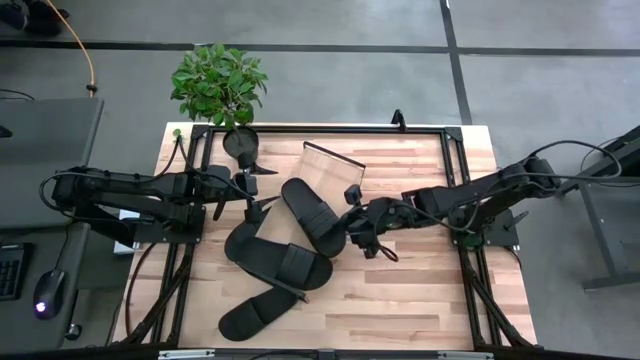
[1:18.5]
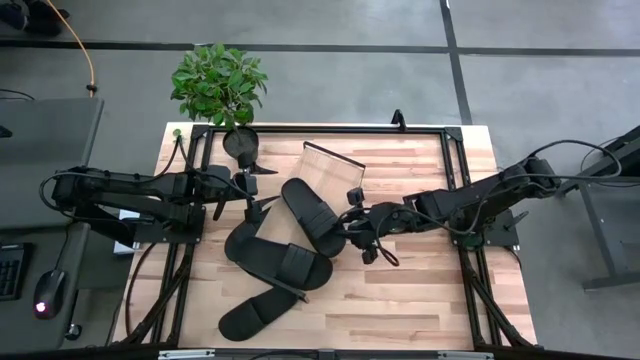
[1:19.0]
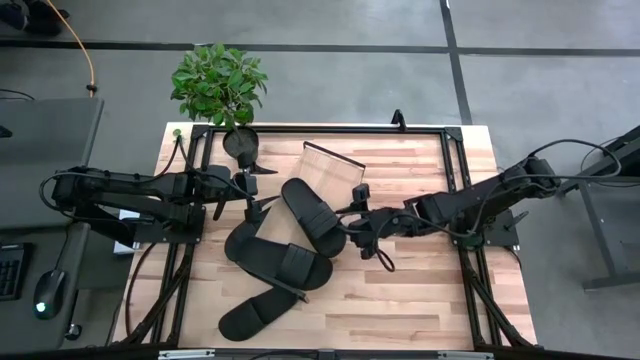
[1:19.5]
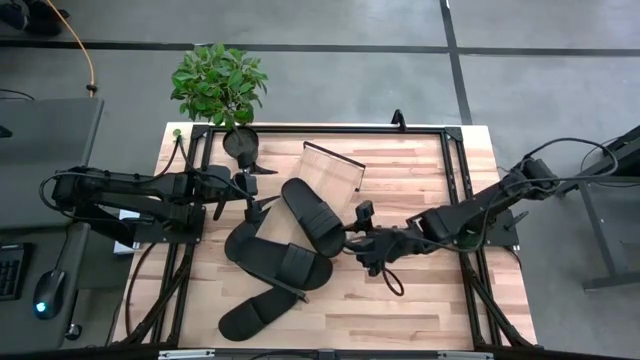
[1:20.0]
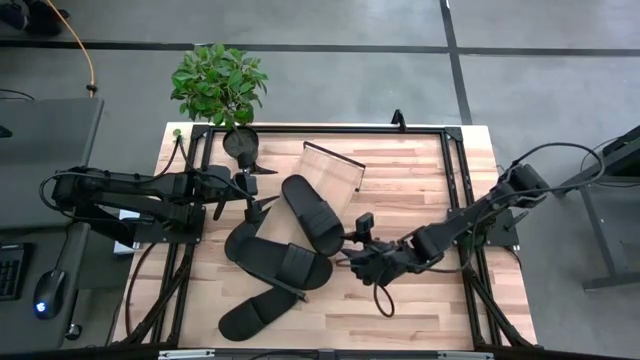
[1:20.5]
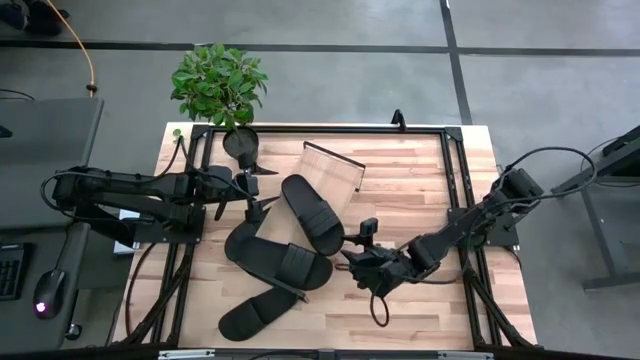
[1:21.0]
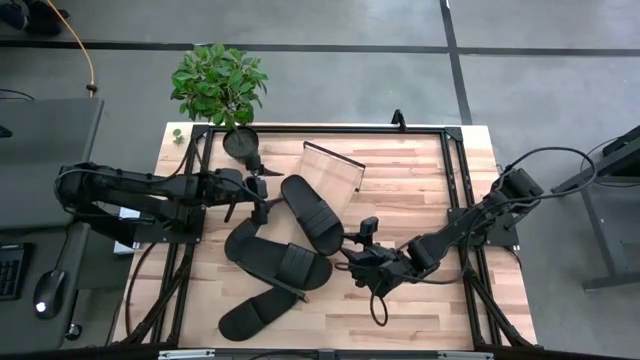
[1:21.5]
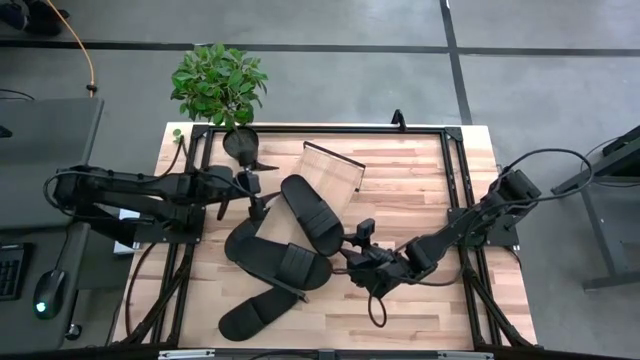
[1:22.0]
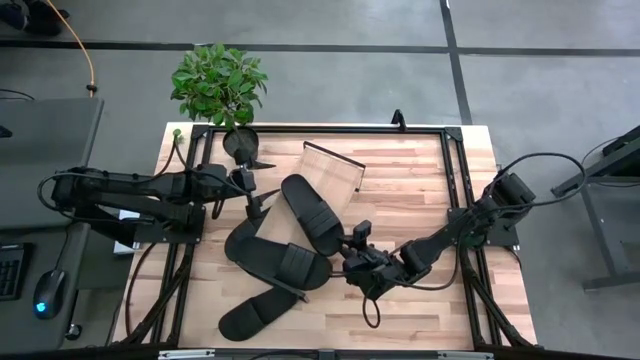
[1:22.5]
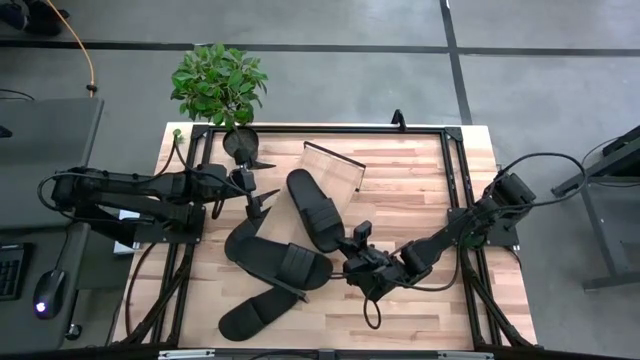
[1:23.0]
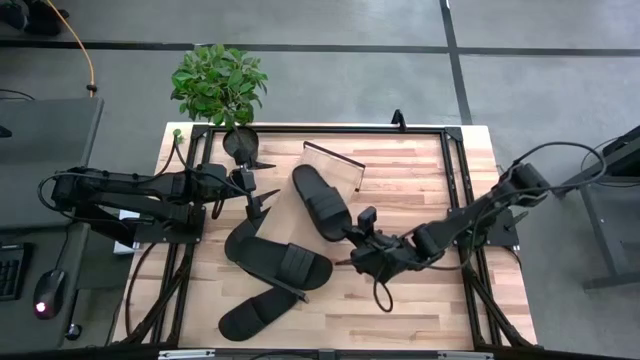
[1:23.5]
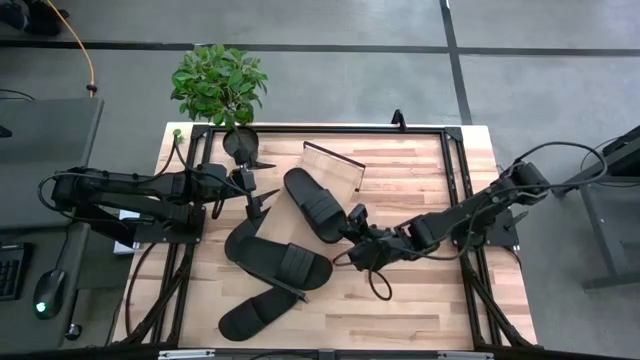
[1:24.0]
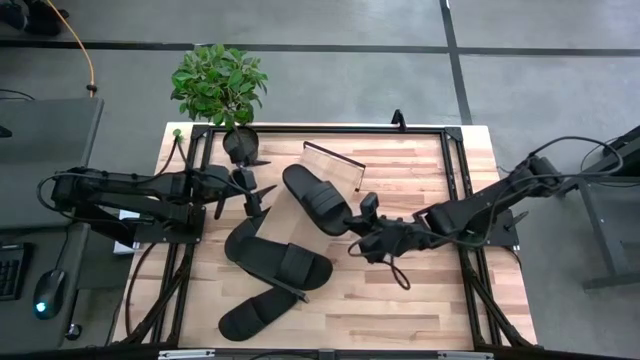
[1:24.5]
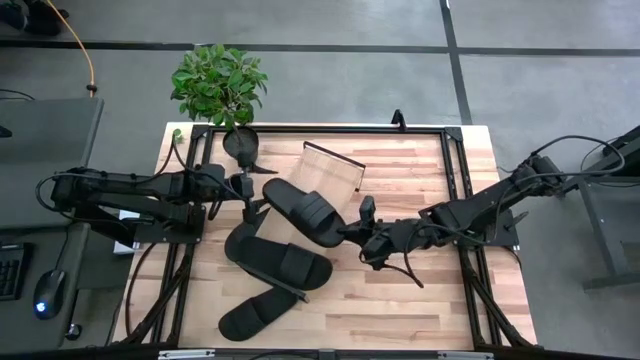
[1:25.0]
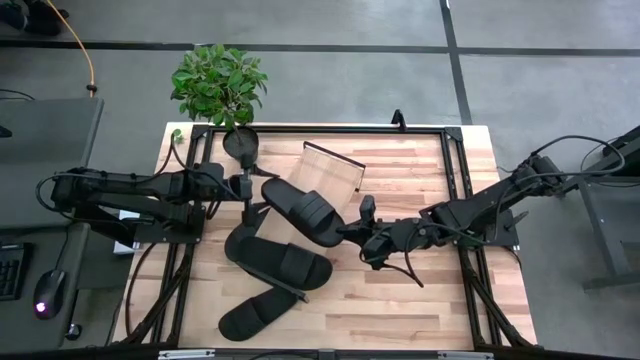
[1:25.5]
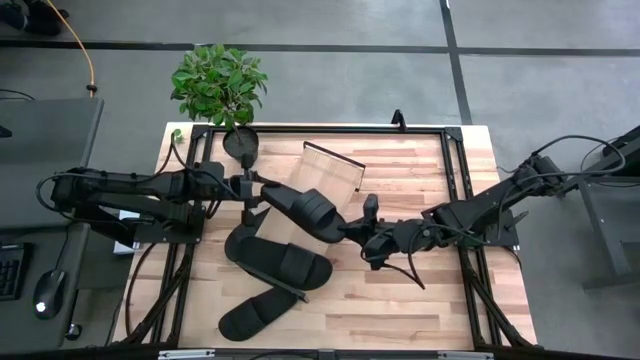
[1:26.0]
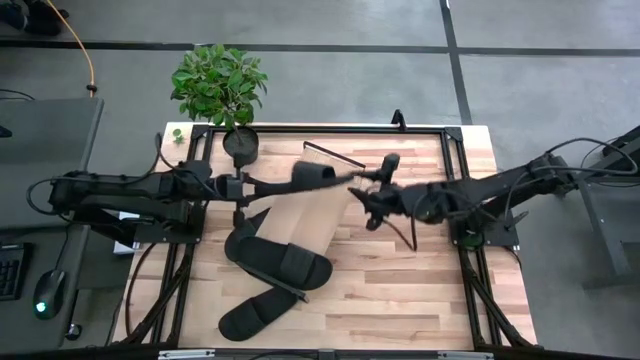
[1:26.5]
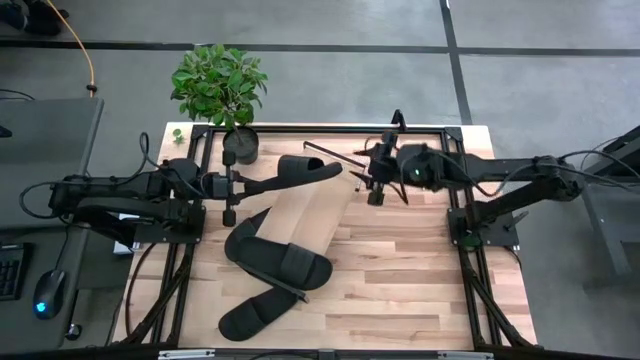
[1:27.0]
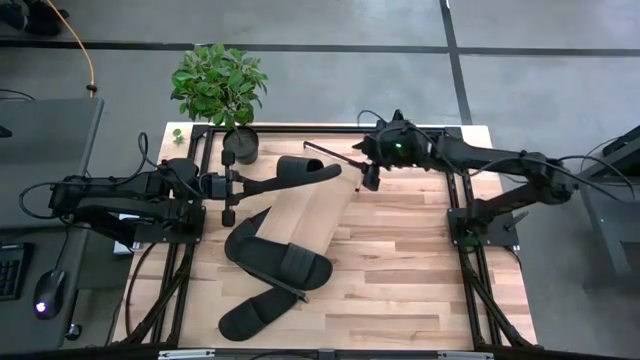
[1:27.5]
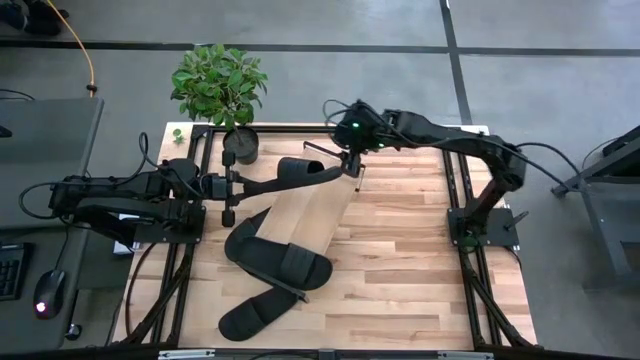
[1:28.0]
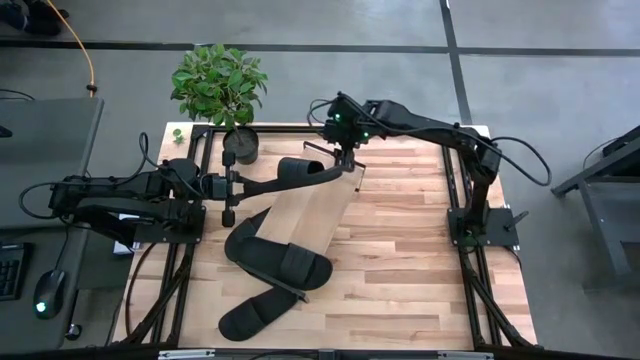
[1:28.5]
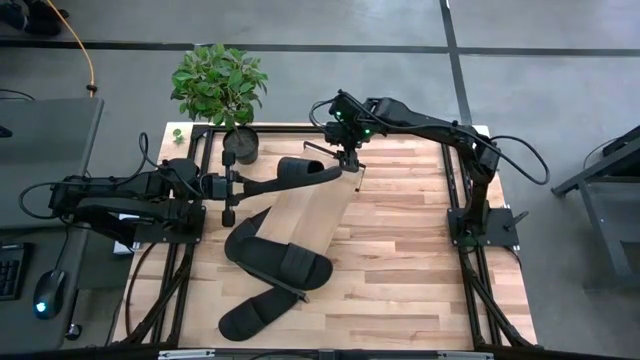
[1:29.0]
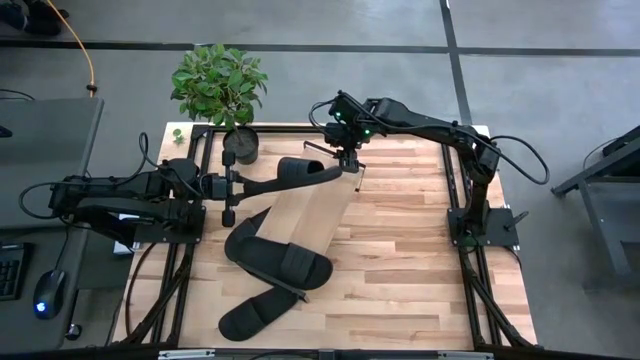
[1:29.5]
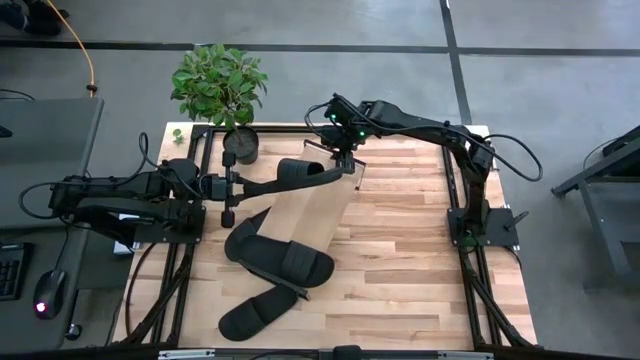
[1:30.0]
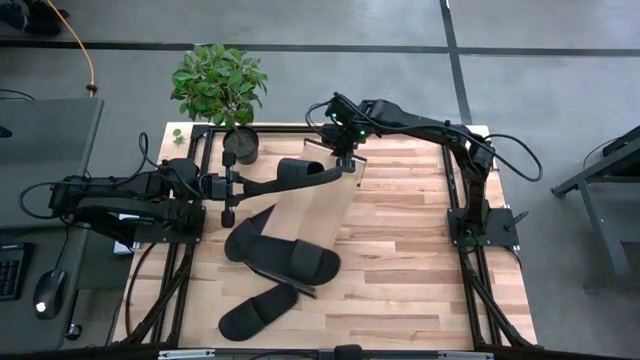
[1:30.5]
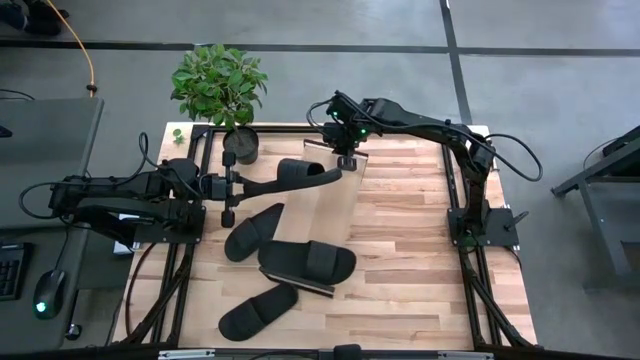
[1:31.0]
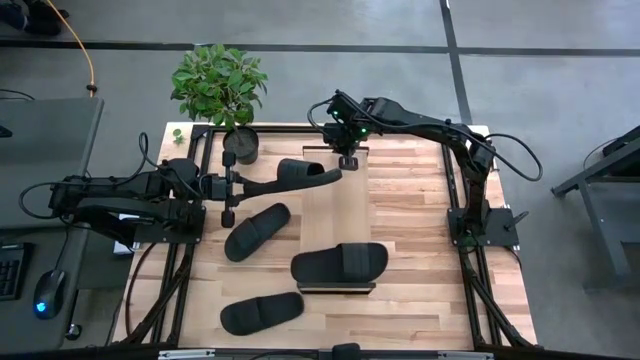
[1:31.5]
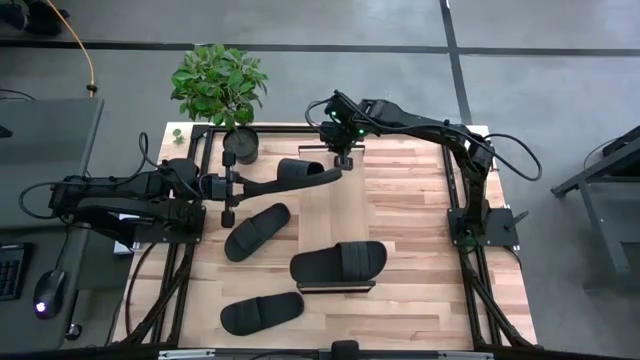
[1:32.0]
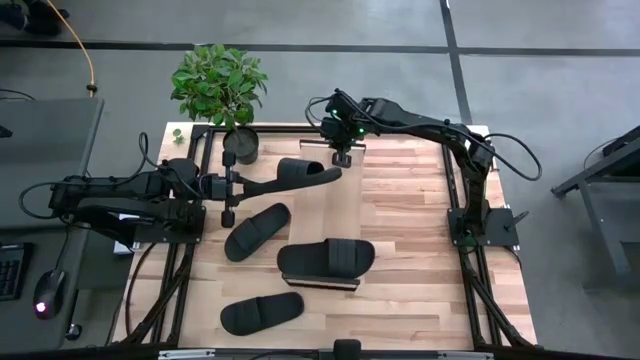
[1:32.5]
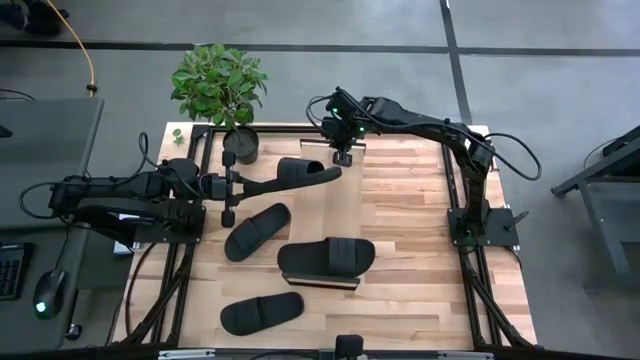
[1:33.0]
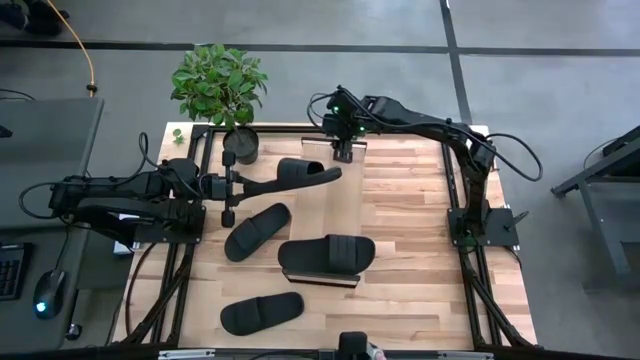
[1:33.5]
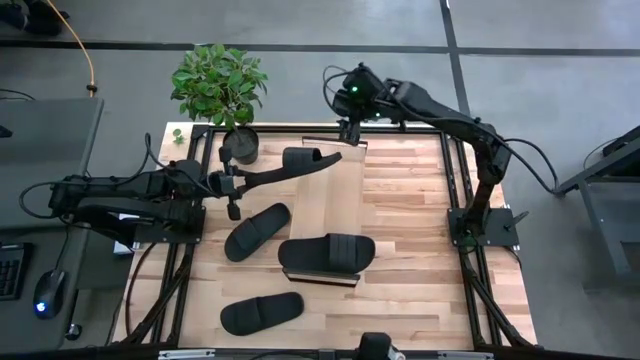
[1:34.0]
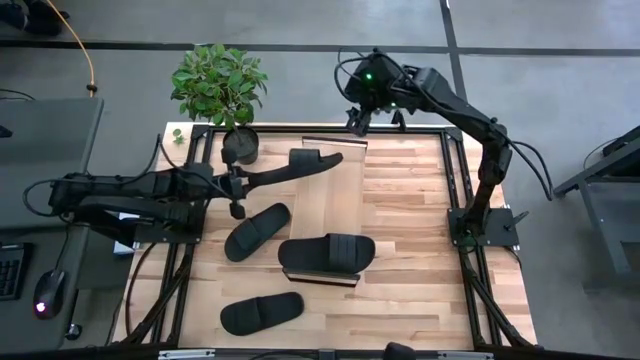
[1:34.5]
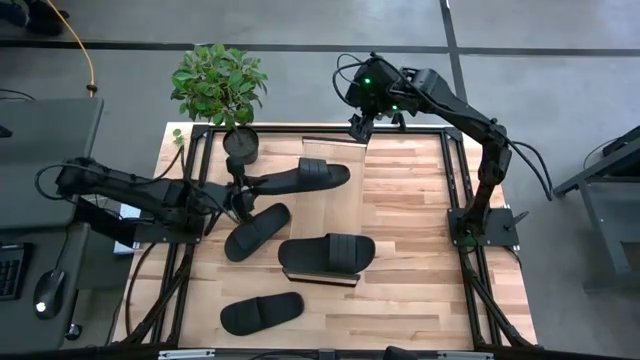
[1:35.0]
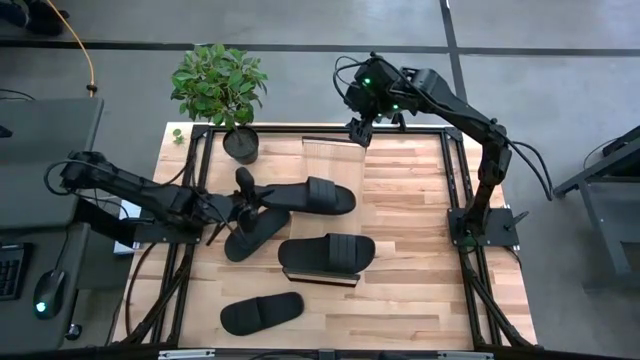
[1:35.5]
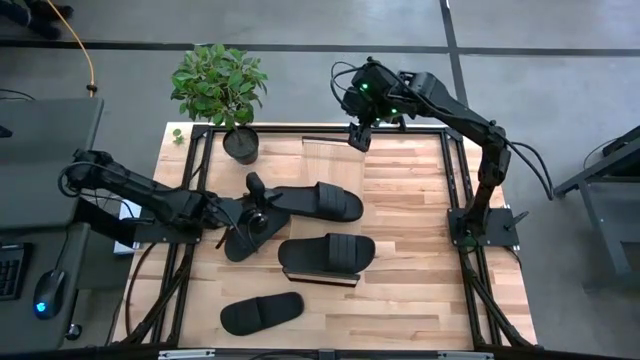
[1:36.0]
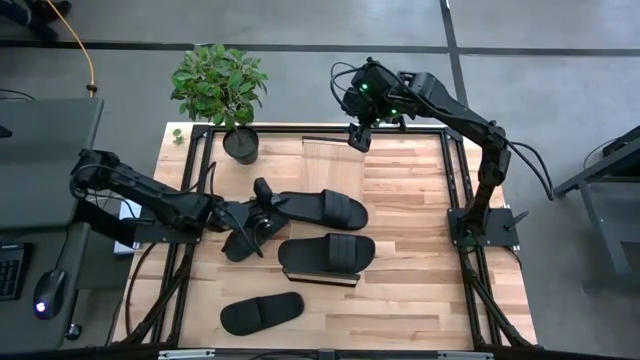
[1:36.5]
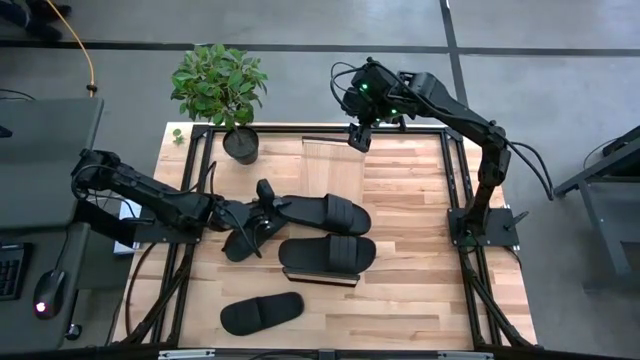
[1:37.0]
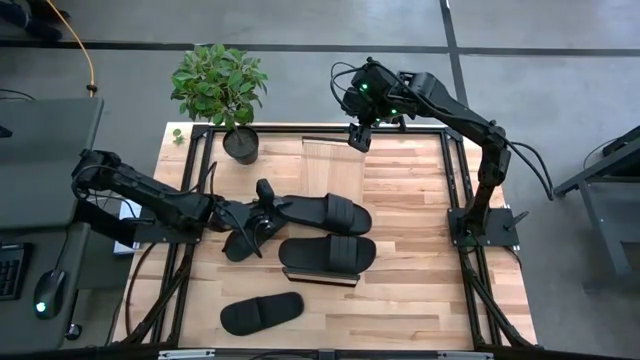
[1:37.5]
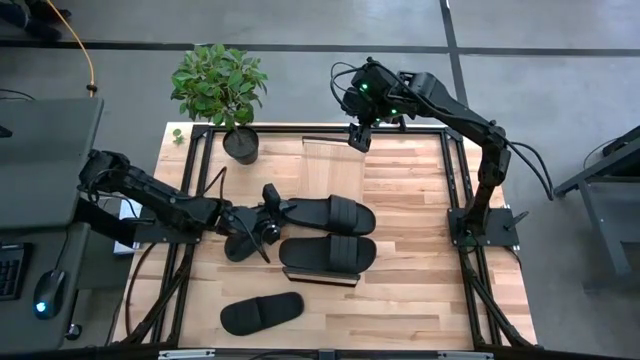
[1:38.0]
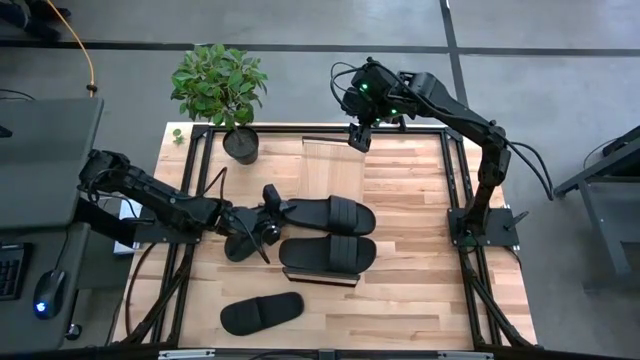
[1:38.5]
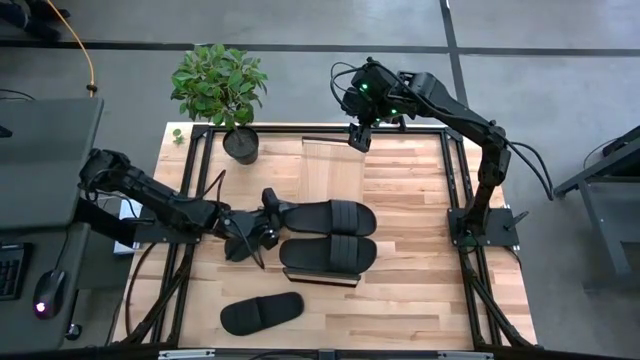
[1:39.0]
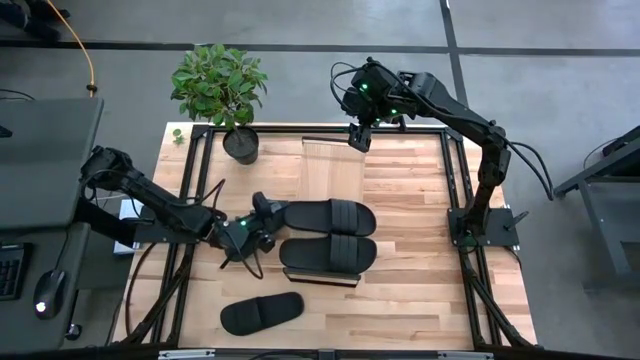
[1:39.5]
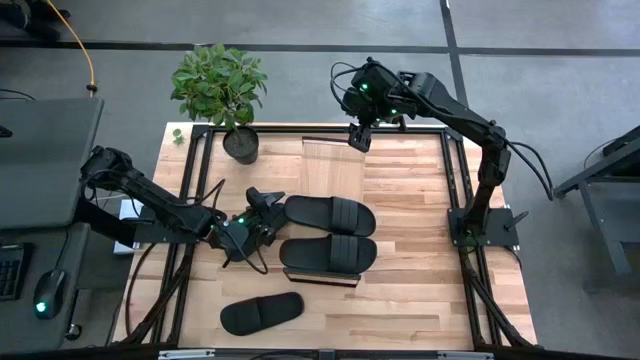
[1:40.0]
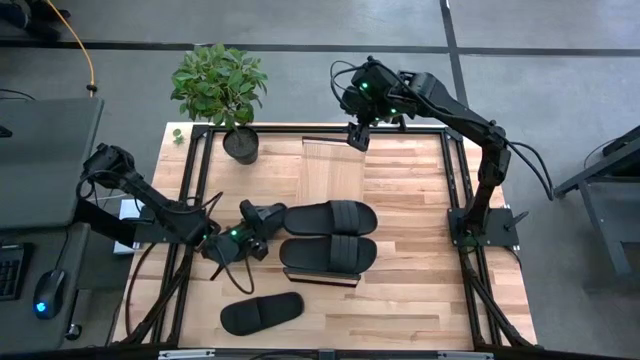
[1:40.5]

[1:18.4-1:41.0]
Task: Pick and place slides into the shelf
Adjust the black slides on the shelf
